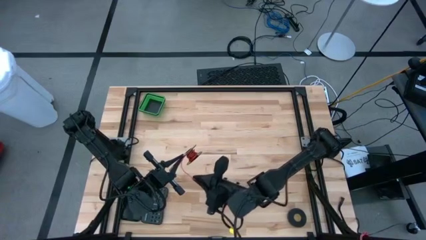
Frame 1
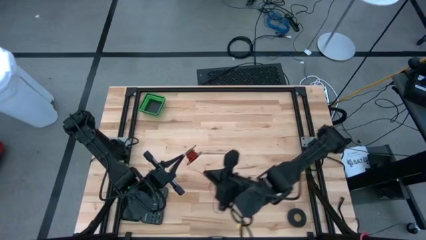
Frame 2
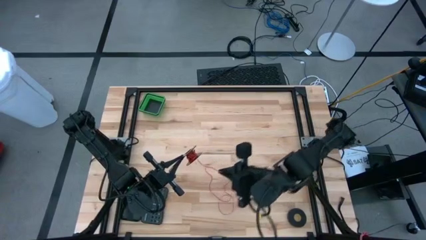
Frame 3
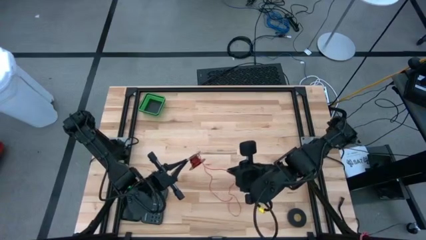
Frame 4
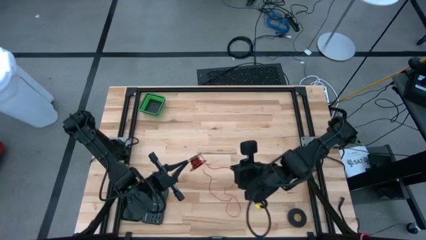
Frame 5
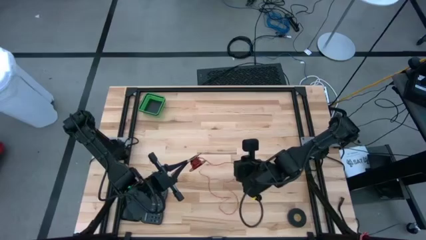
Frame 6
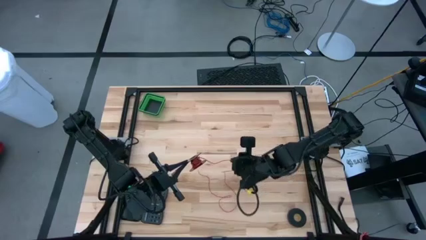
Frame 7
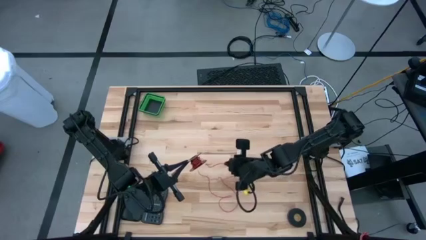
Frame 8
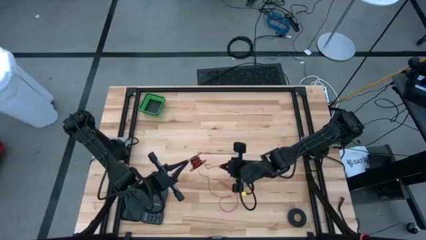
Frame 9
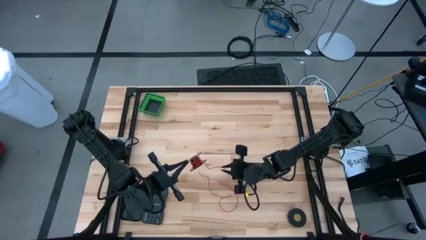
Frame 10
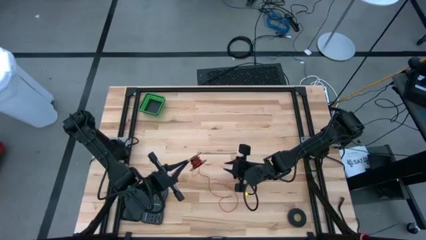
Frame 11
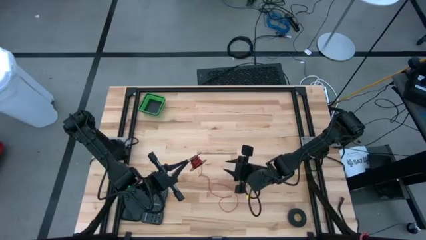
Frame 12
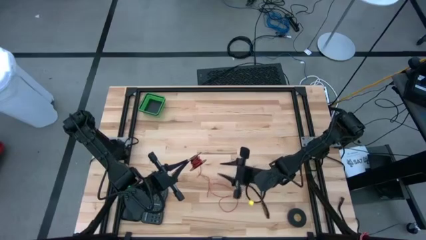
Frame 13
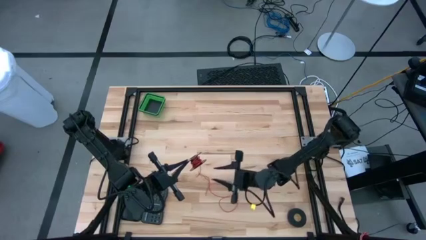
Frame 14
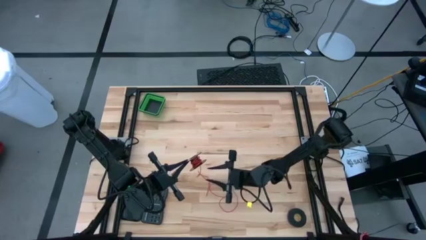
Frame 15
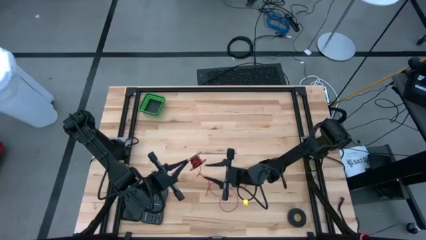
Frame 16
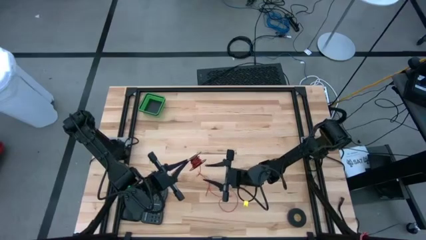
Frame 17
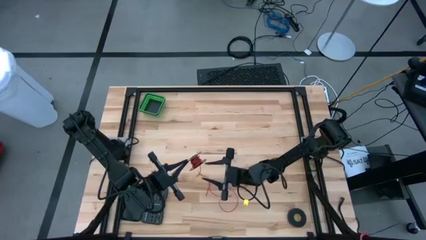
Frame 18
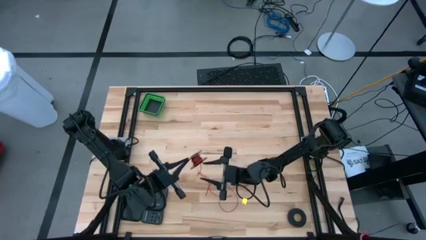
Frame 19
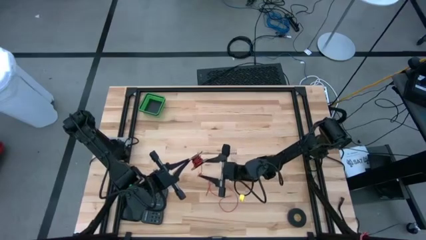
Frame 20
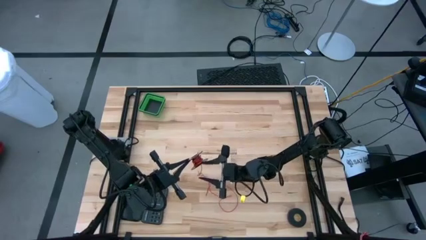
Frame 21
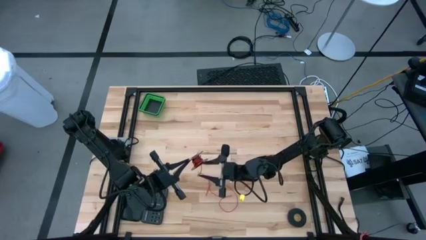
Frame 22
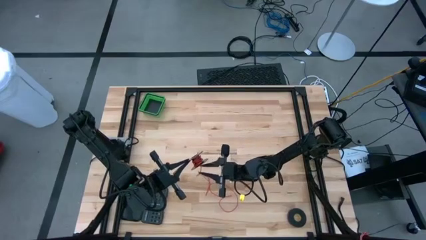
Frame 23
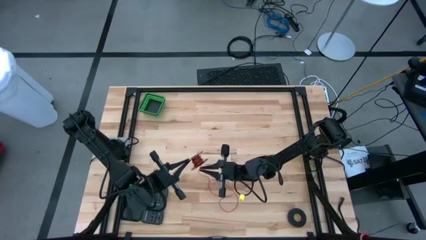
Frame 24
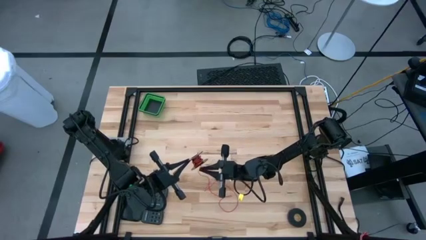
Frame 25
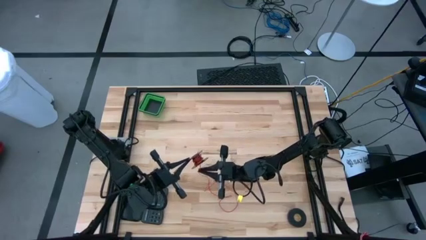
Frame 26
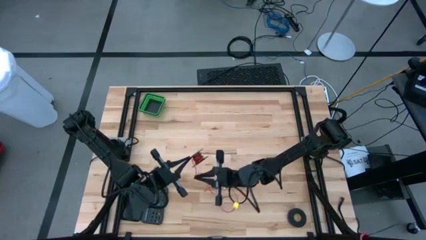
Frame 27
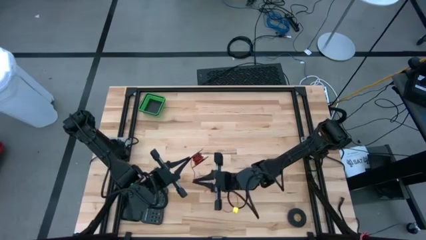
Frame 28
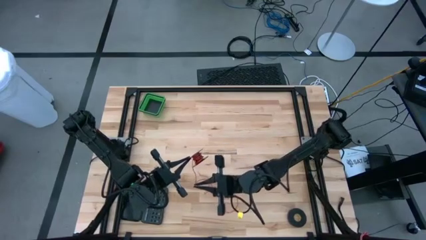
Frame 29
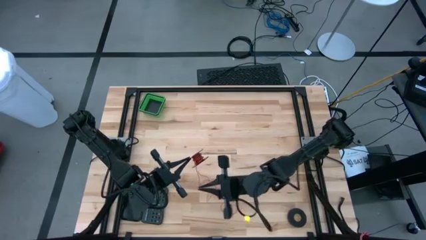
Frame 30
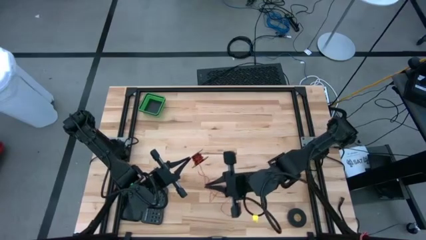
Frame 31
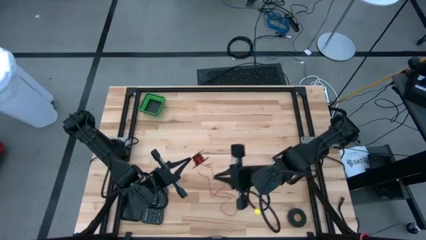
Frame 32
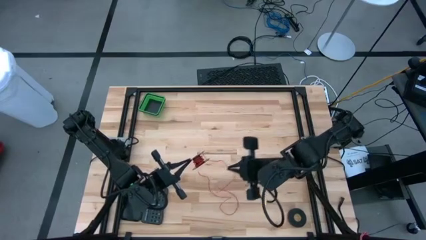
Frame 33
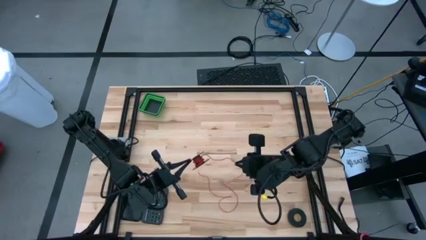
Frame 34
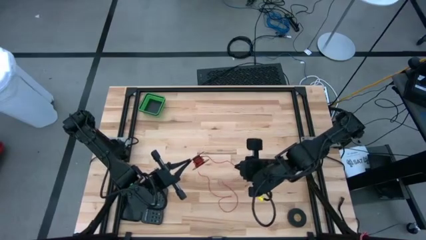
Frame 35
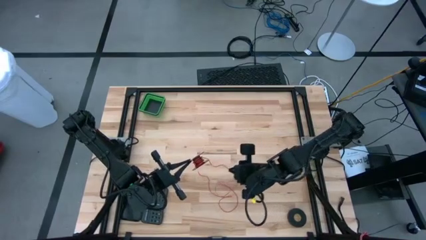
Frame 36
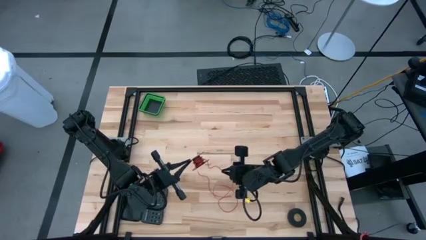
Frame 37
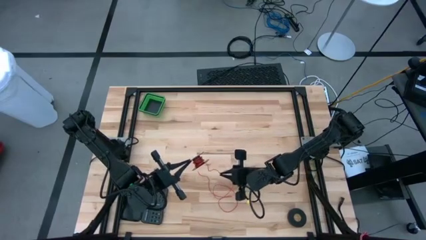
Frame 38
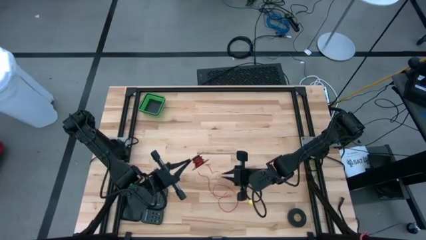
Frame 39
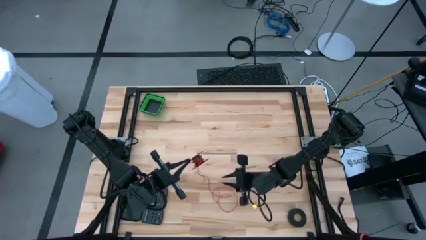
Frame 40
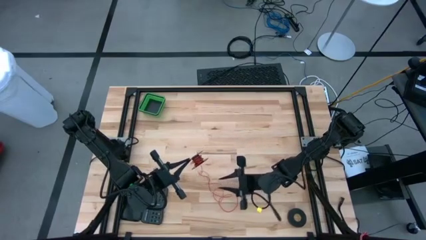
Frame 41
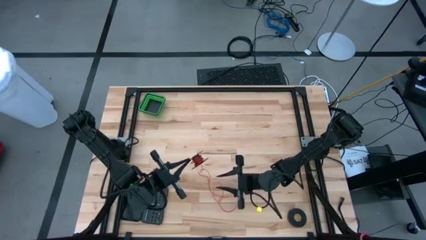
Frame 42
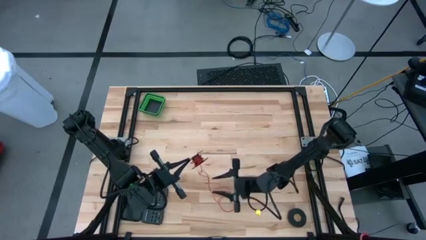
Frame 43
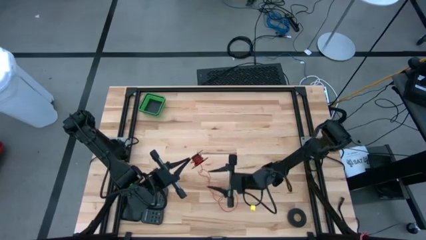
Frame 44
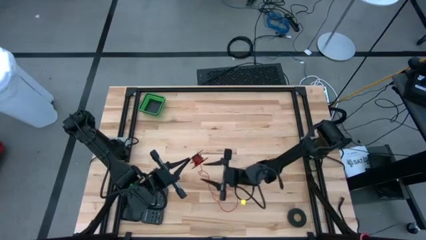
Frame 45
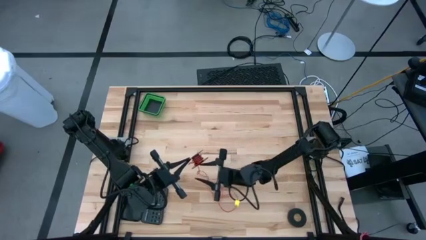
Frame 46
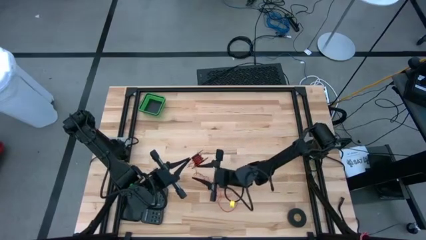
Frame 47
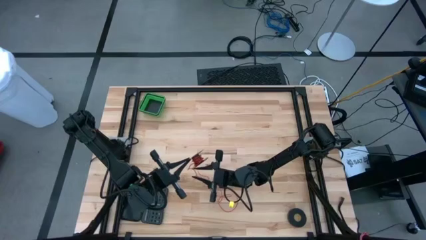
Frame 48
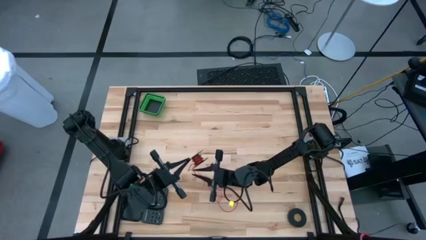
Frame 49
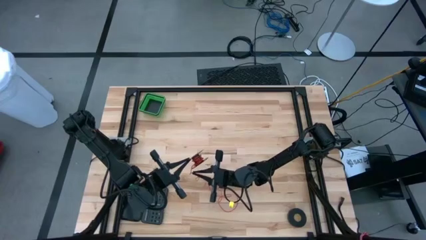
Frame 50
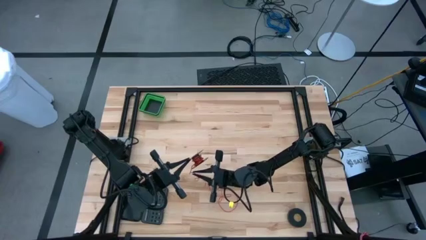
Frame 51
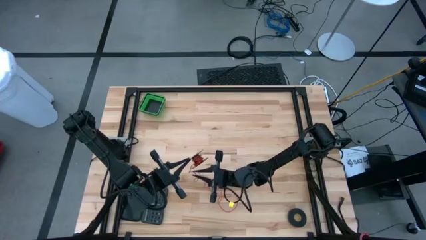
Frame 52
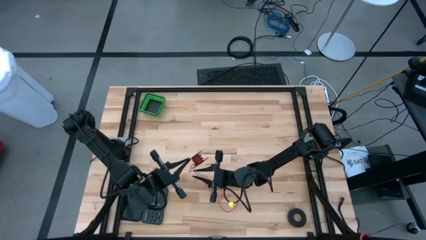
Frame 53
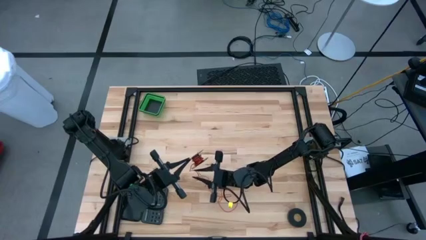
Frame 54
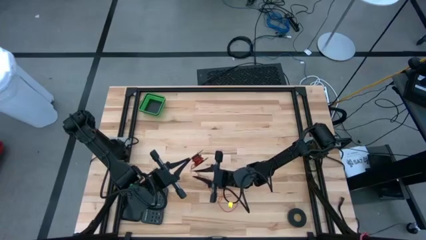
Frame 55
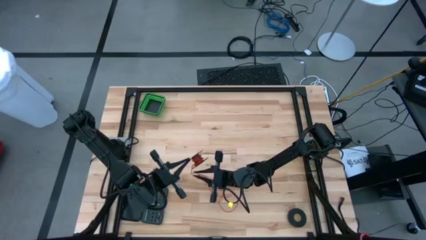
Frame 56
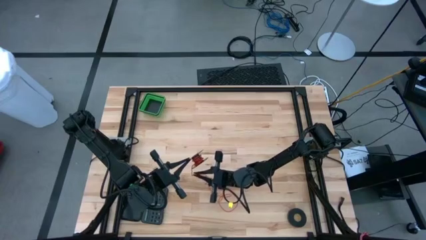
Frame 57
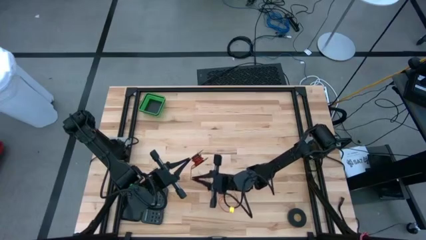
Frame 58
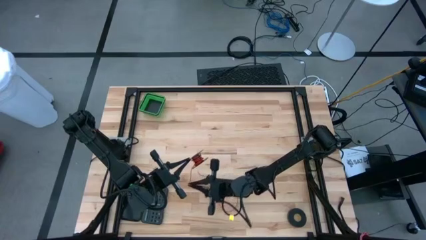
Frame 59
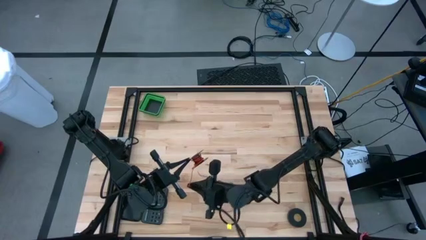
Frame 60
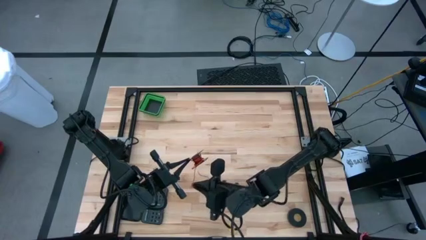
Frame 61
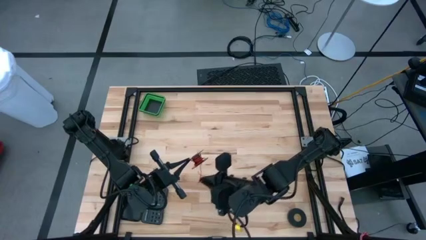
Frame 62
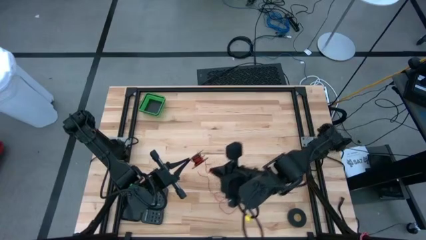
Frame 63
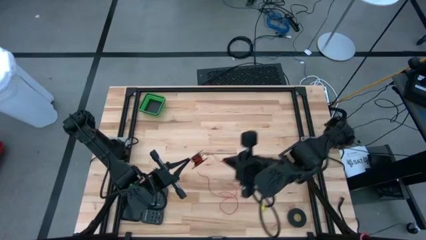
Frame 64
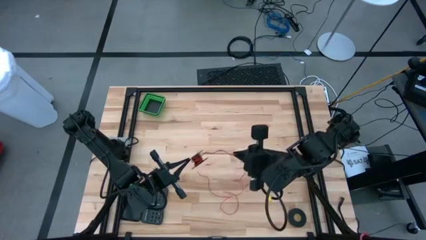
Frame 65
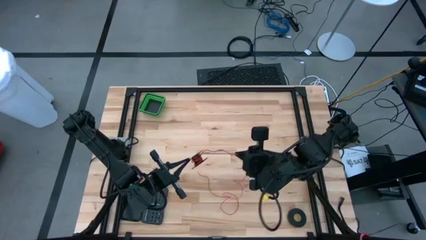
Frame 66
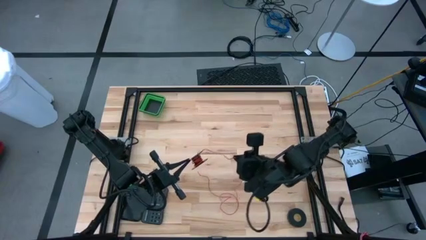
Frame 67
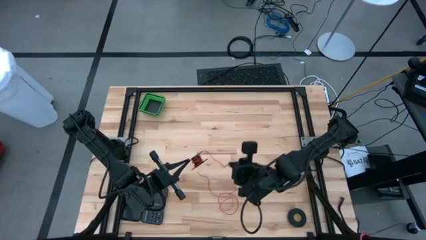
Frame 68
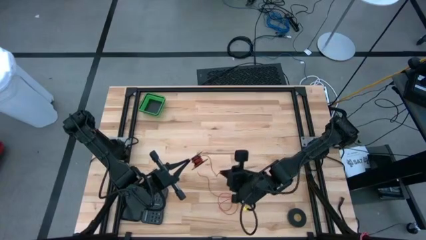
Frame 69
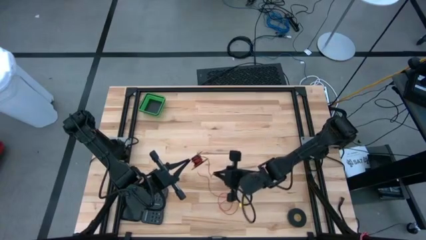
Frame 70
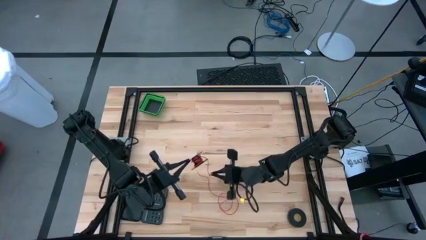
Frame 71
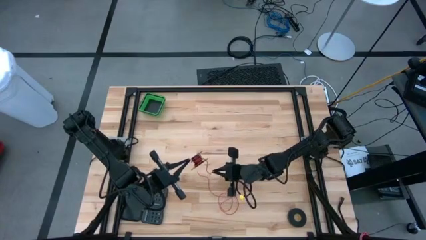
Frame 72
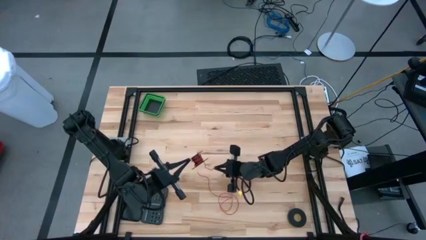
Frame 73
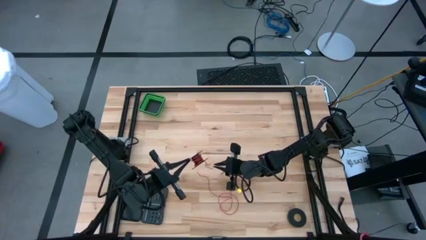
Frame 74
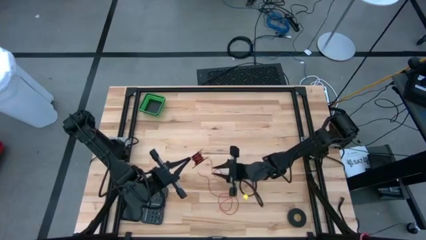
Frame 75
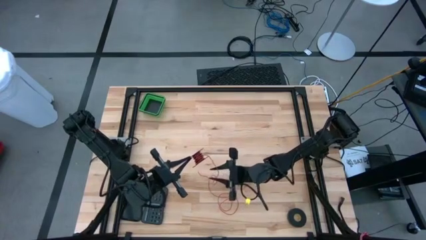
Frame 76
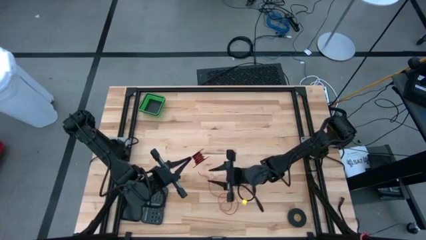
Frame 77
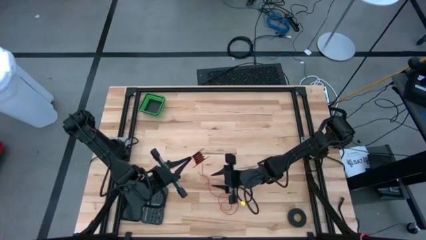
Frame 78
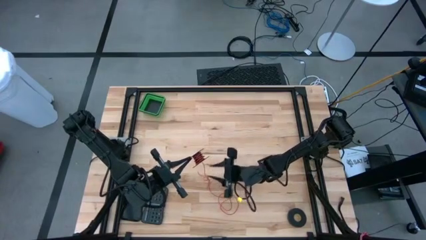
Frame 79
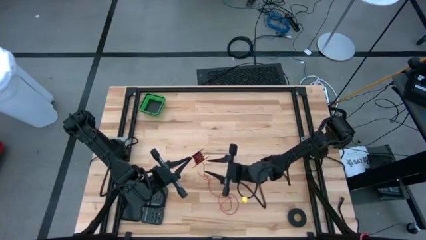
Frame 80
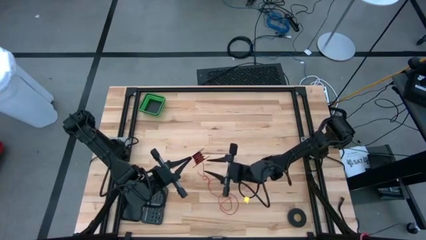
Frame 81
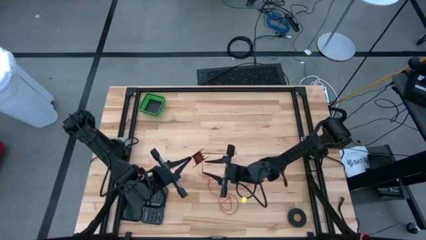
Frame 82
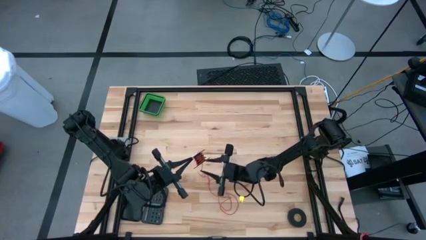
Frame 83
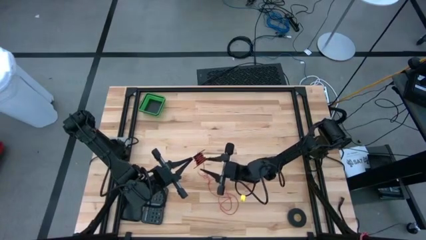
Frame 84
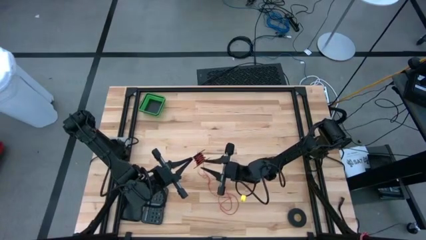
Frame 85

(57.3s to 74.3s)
Task: Coil cords
Uncoil the red wire from the spool
